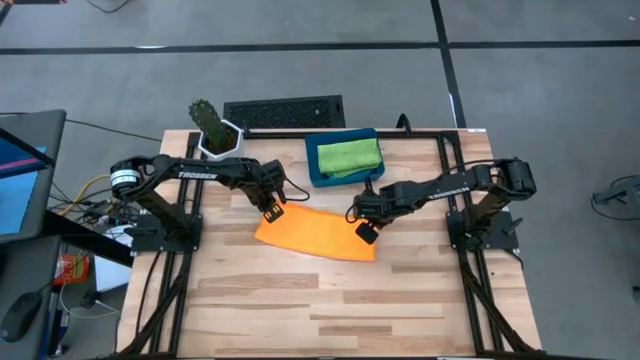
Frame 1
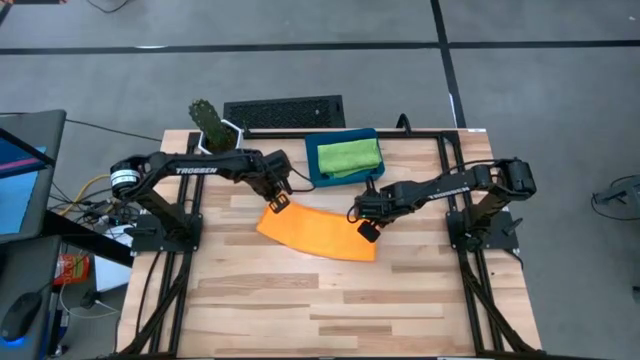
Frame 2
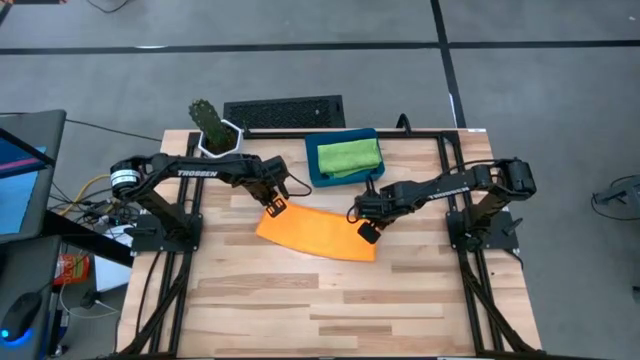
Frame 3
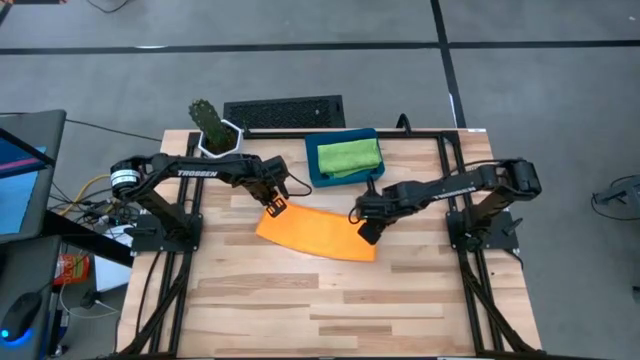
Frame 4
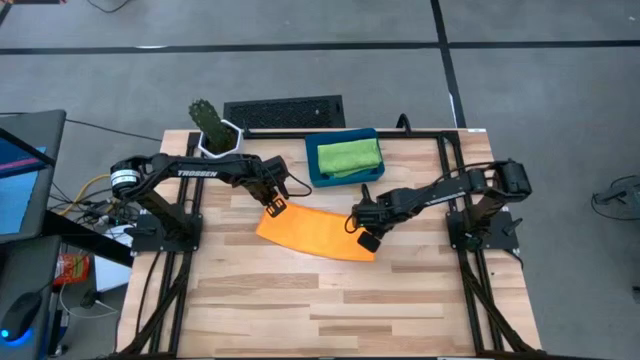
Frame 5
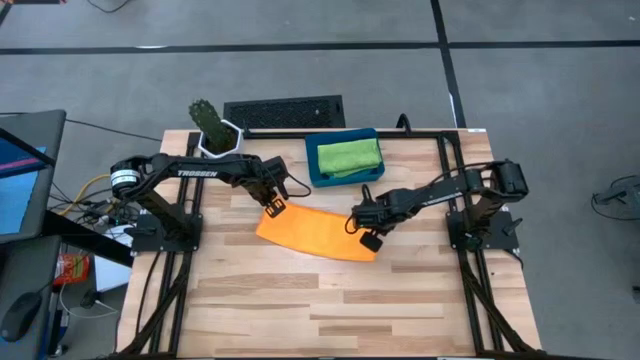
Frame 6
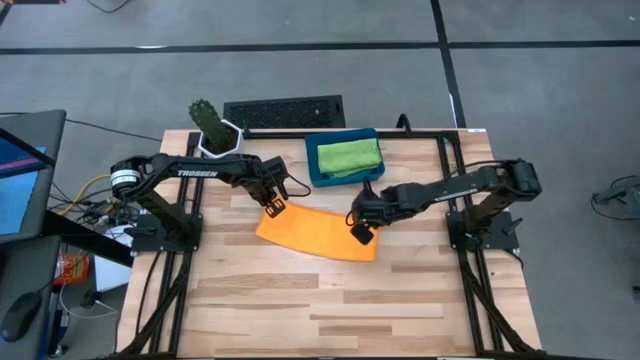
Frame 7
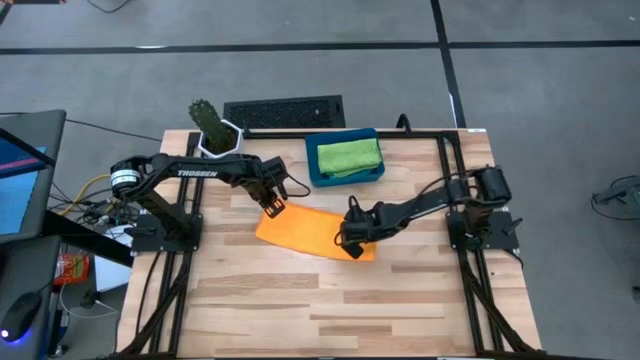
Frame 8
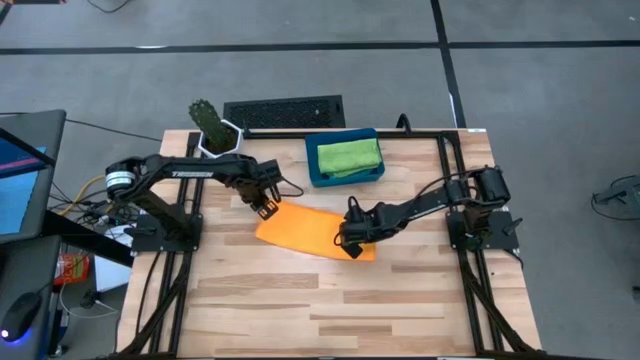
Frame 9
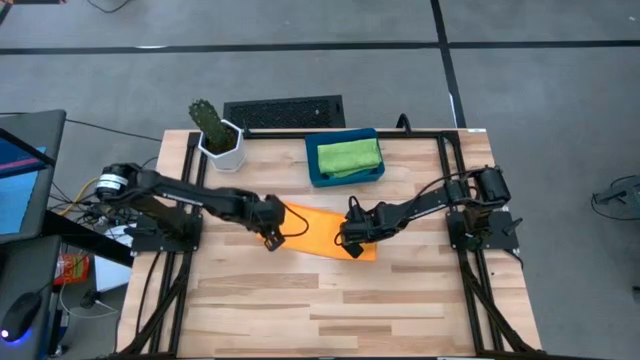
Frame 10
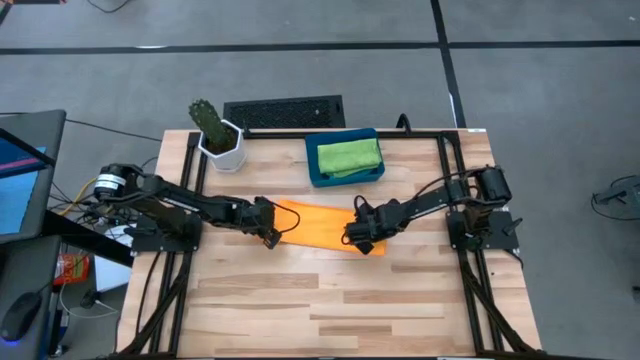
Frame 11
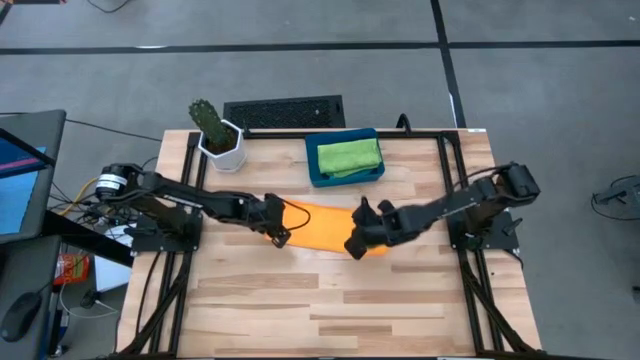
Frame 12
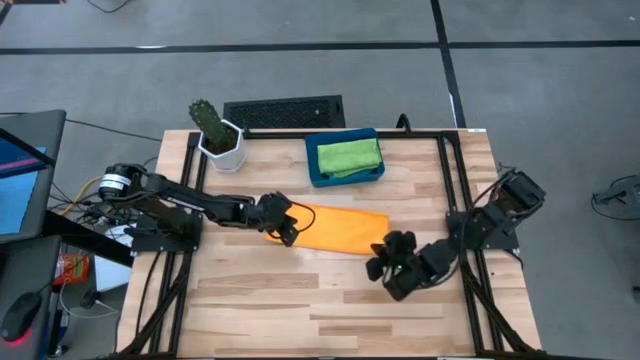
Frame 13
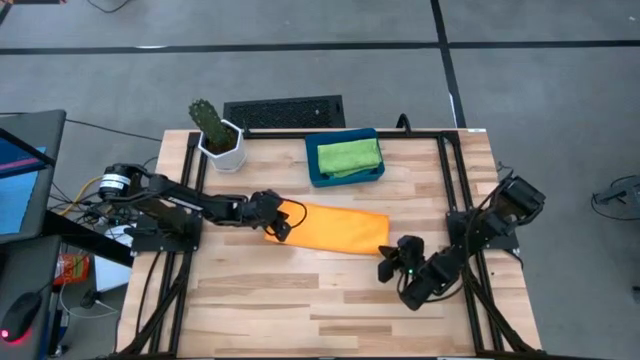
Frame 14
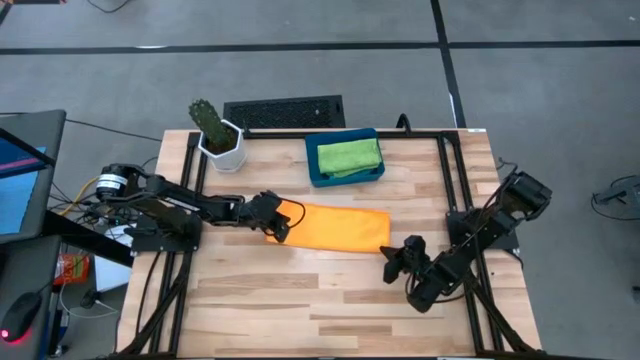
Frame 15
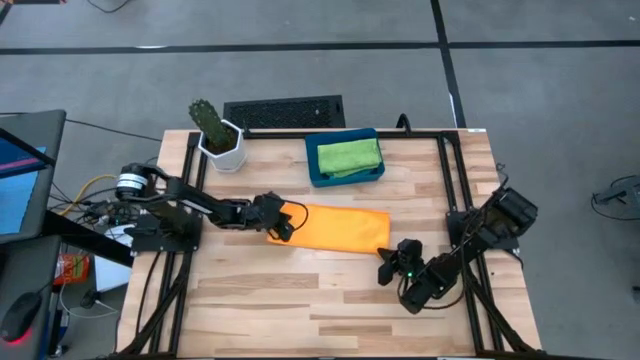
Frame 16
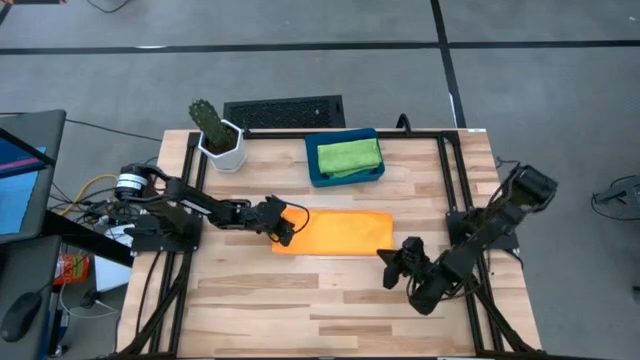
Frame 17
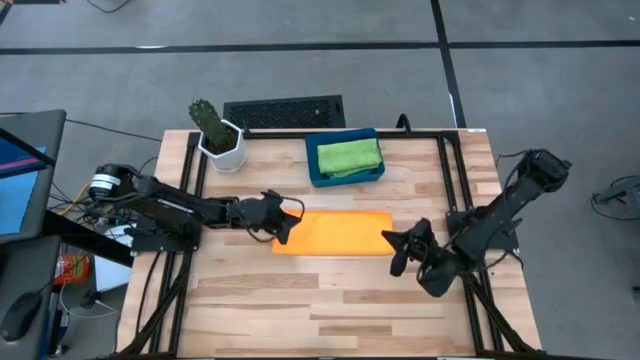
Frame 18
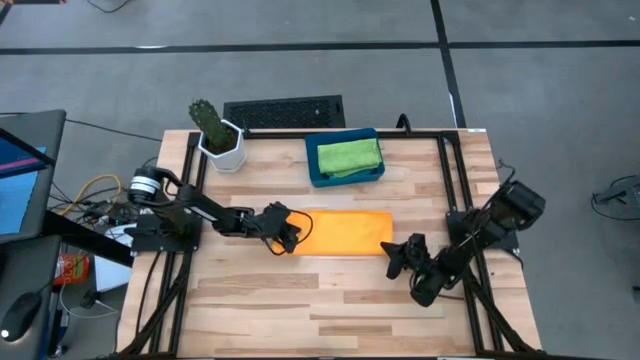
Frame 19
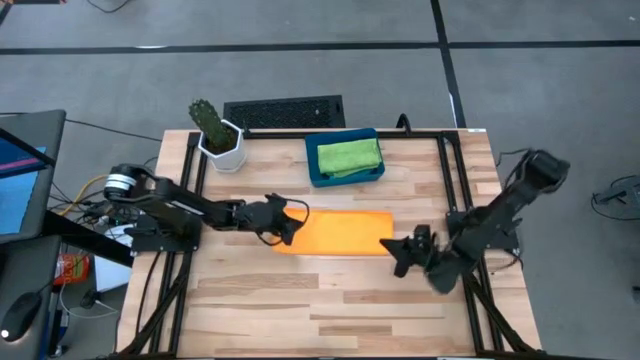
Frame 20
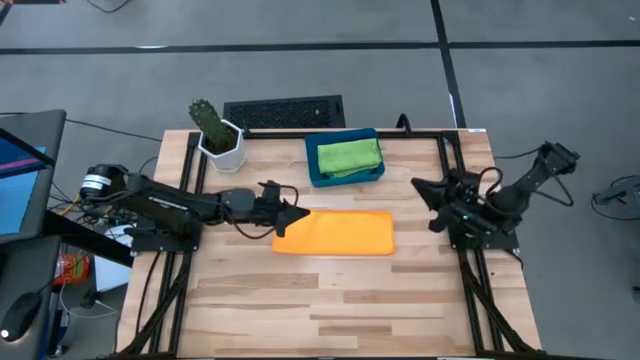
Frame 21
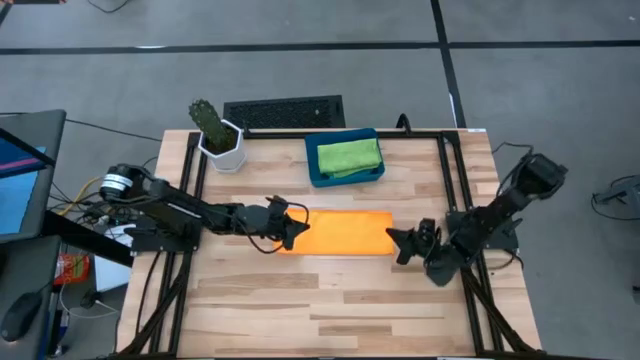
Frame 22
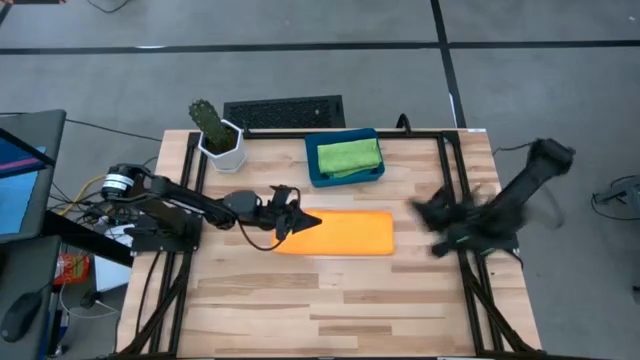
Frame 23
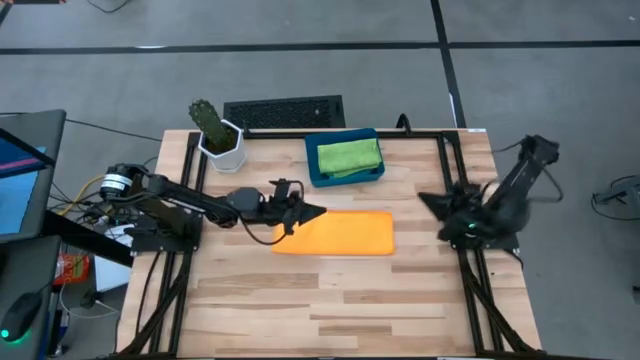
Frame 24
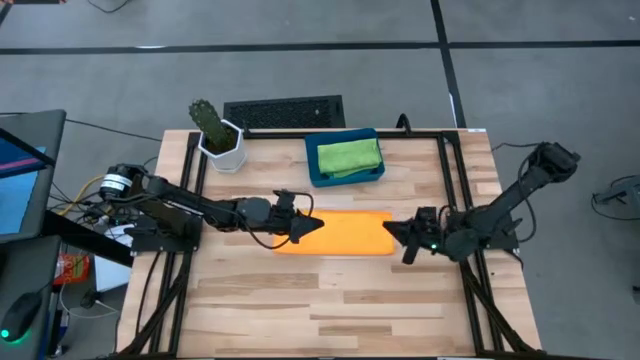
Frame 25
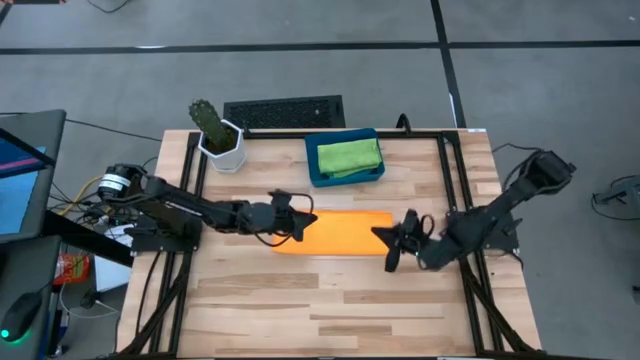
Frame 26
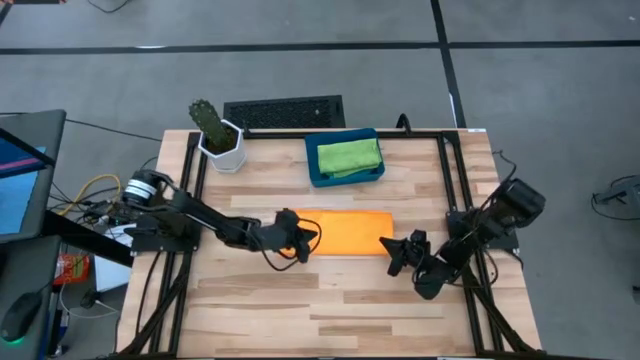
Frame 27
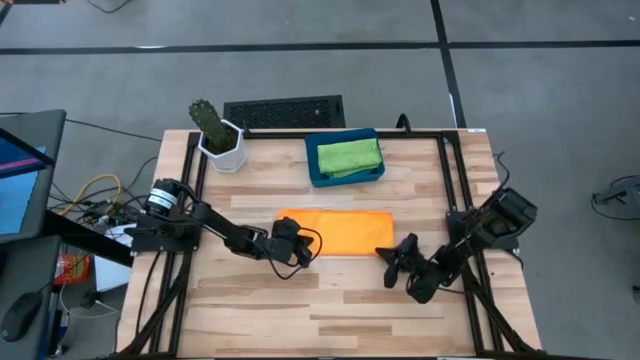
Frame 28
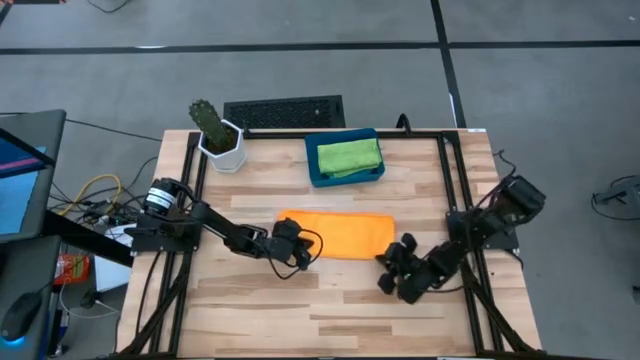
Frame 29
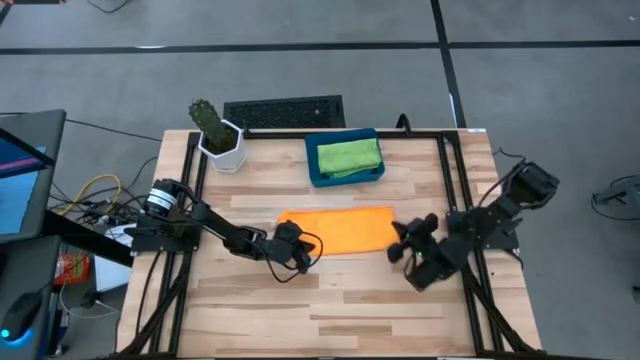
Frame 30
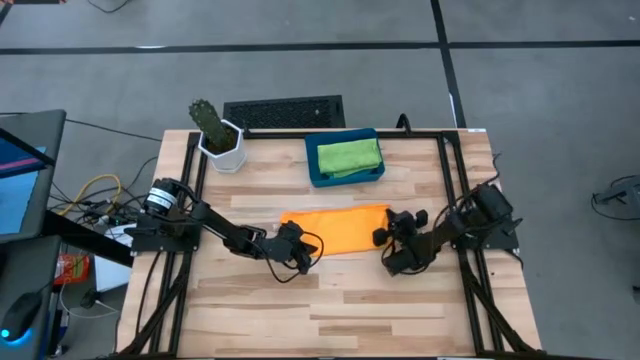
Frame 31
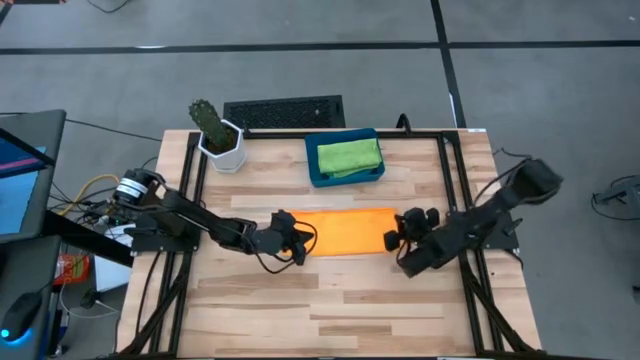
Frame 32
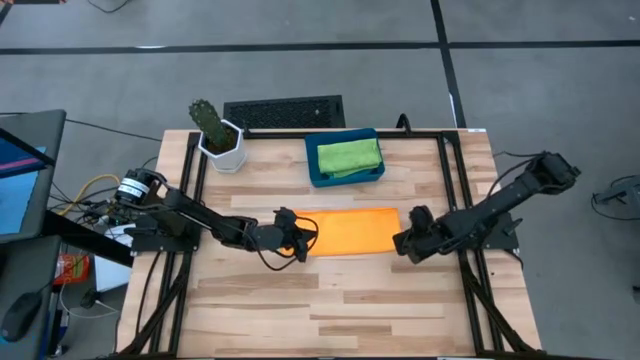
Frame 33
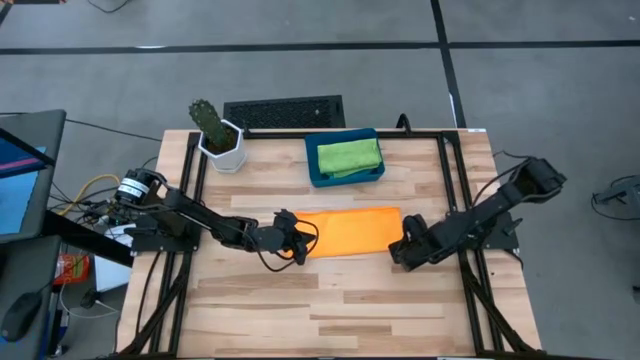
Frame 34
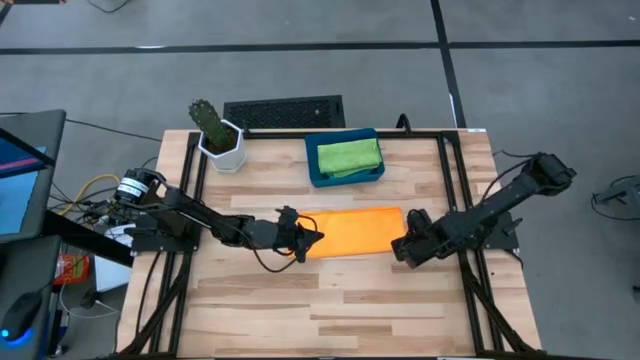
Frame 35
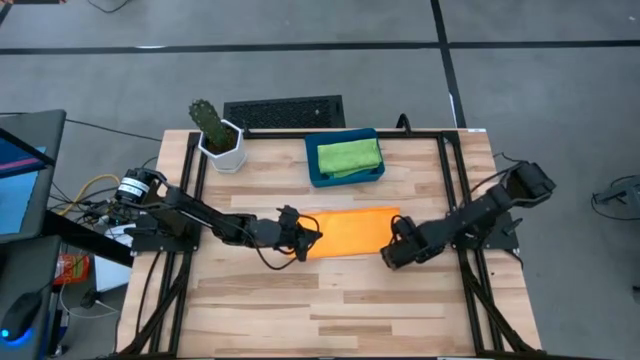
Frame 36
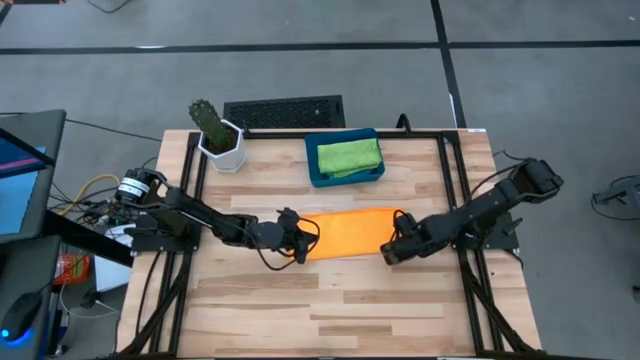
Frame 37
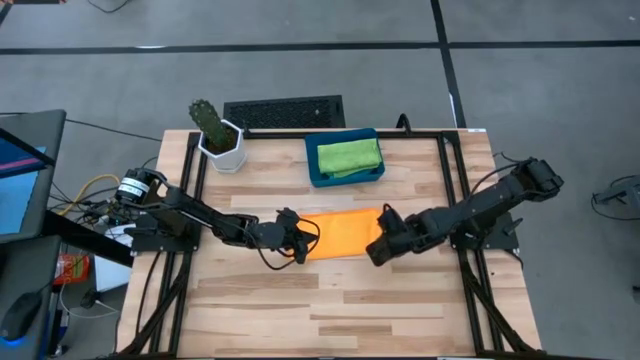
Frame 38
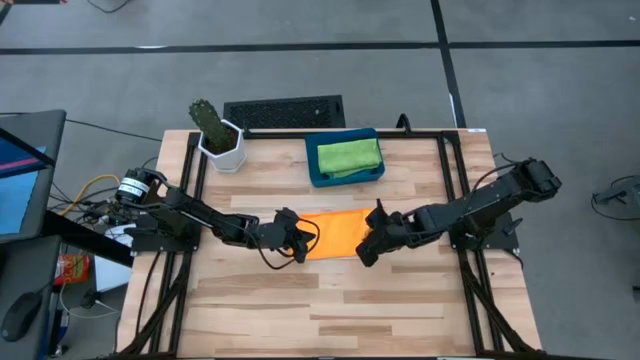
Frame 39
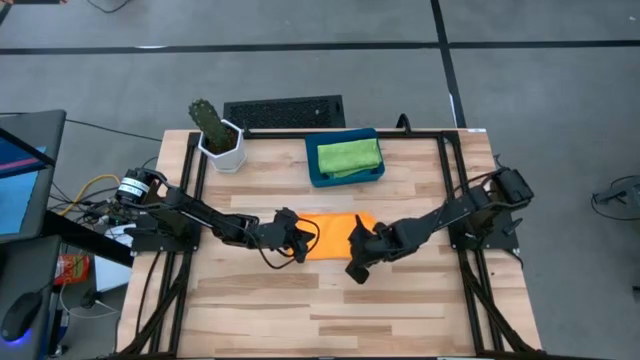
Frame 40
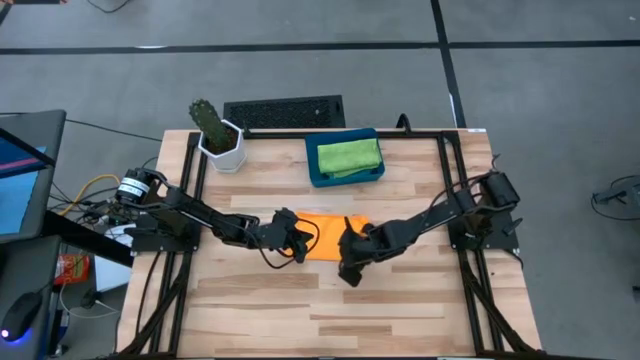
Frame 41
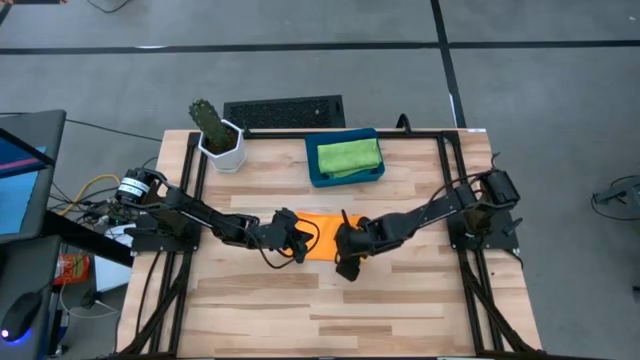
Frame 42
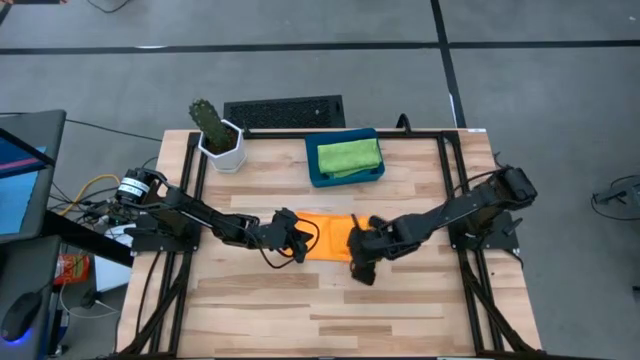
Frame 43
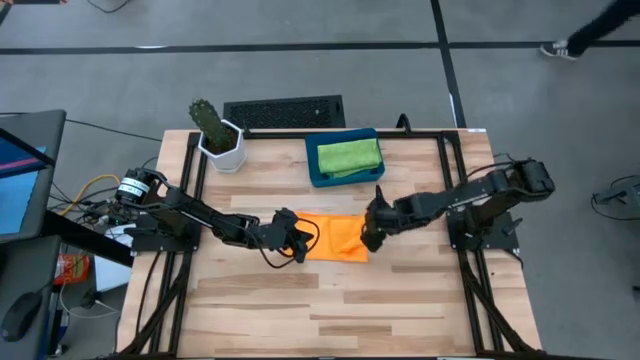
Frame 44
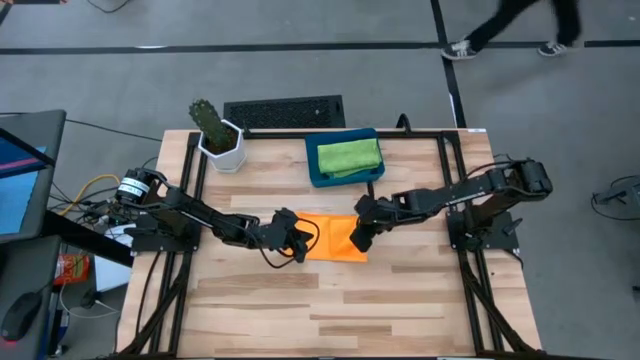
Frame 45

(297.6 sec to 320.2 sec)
Task: Fold microfiber towels
Fold the orange microfiber cloth
